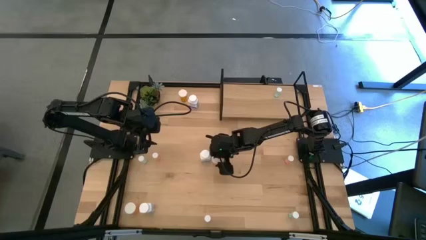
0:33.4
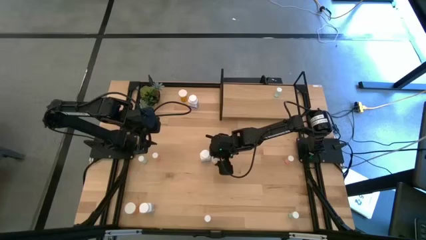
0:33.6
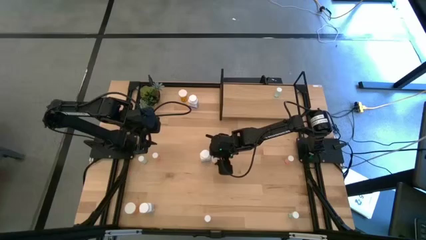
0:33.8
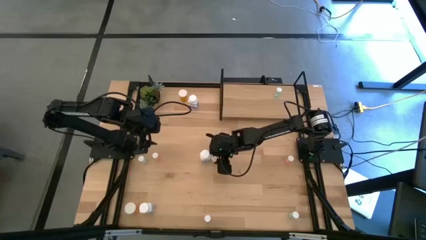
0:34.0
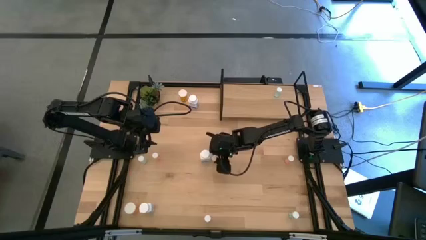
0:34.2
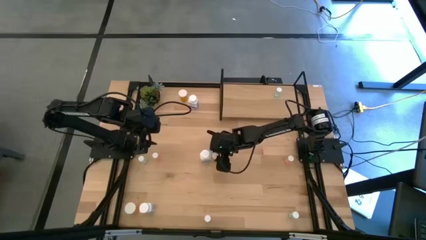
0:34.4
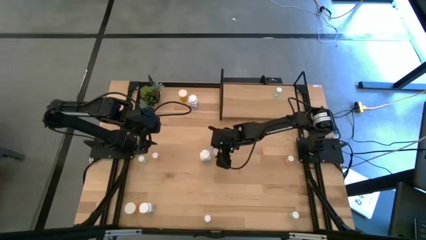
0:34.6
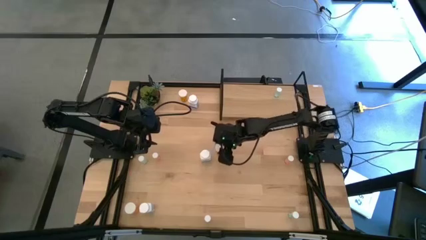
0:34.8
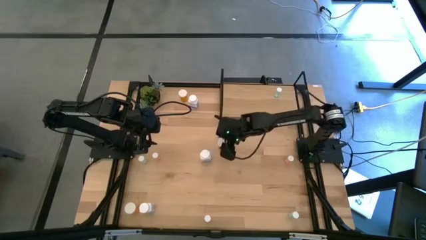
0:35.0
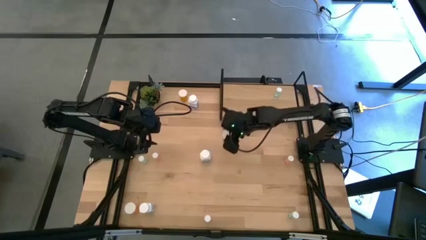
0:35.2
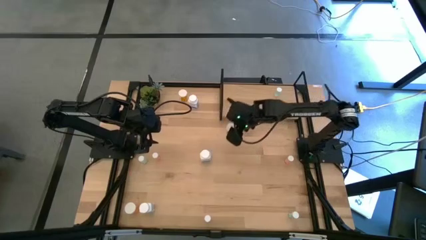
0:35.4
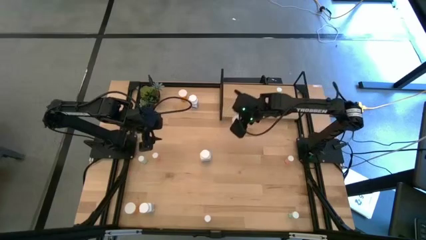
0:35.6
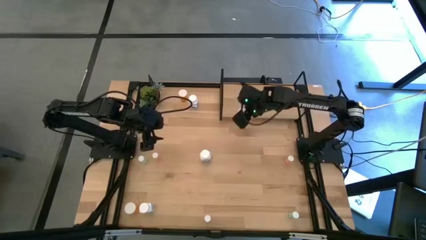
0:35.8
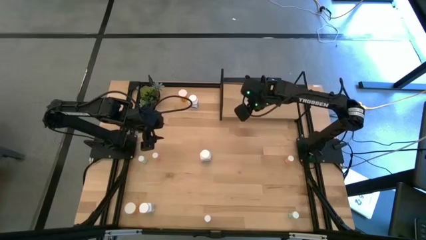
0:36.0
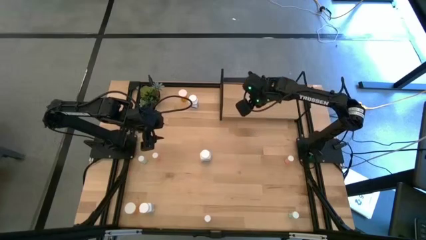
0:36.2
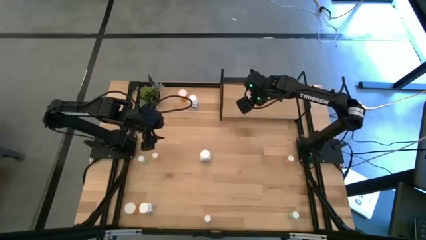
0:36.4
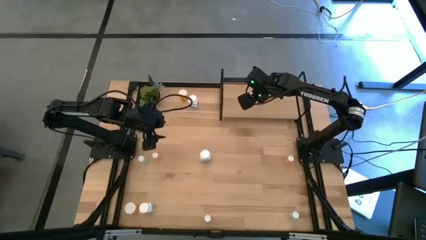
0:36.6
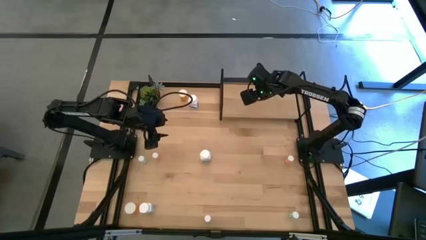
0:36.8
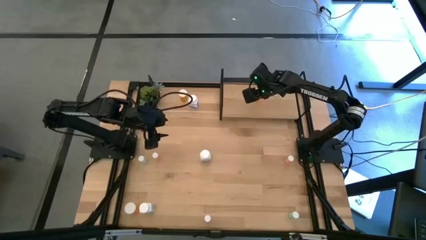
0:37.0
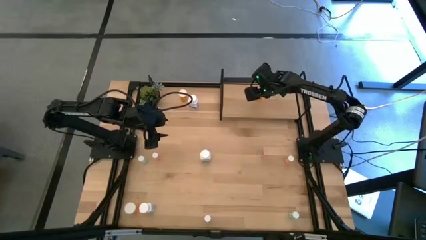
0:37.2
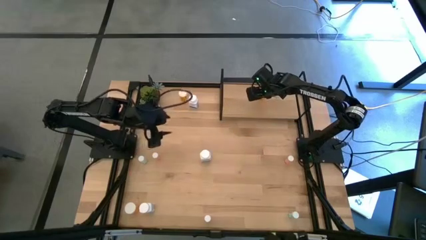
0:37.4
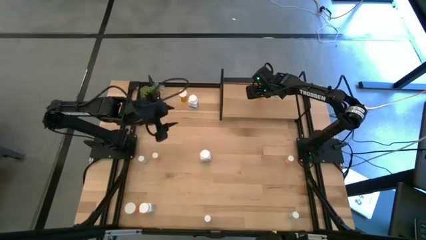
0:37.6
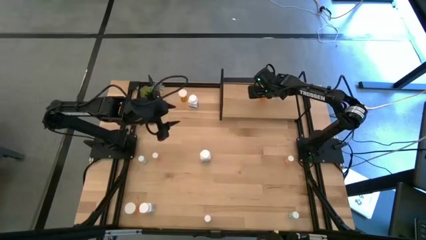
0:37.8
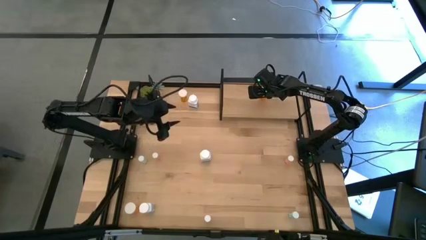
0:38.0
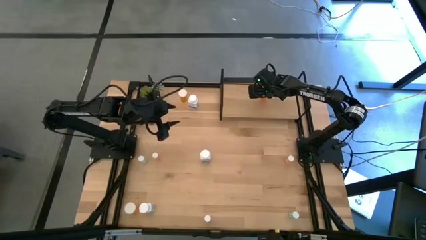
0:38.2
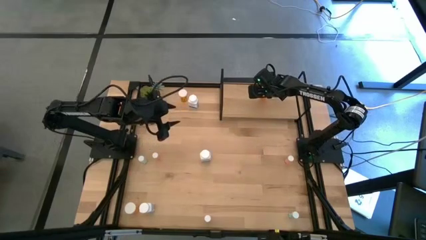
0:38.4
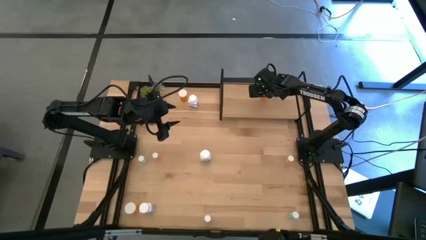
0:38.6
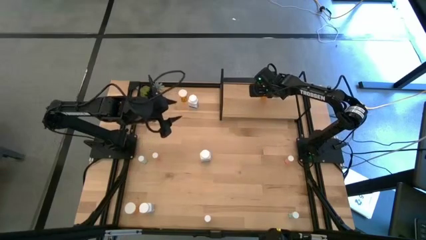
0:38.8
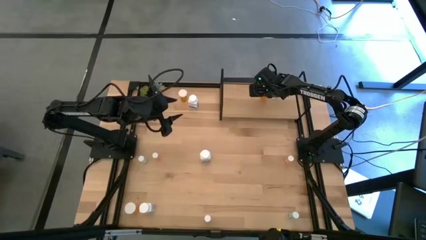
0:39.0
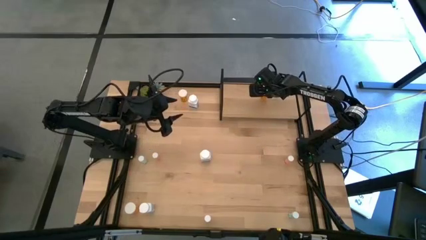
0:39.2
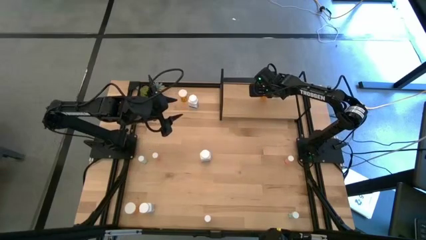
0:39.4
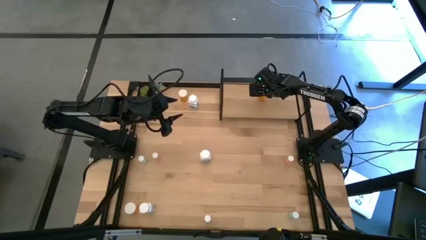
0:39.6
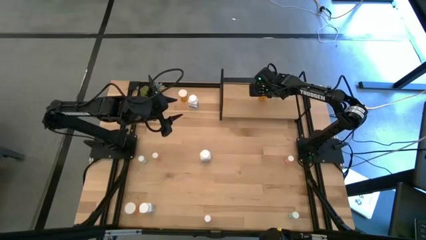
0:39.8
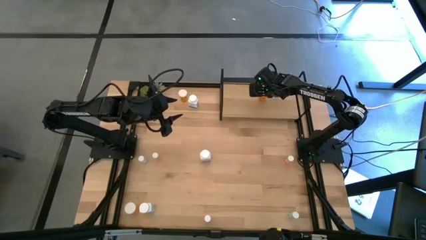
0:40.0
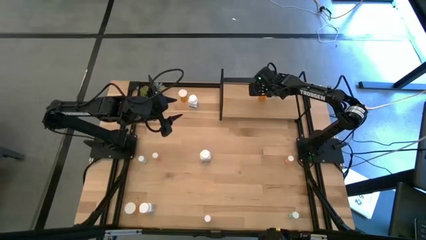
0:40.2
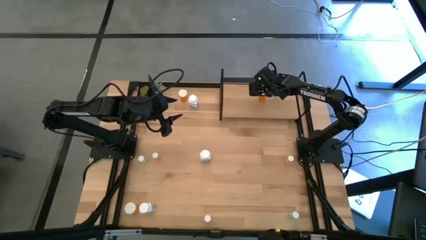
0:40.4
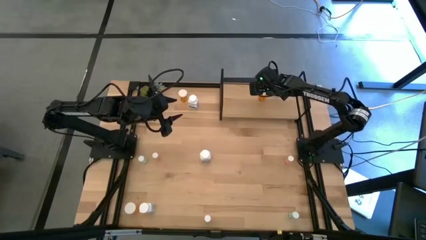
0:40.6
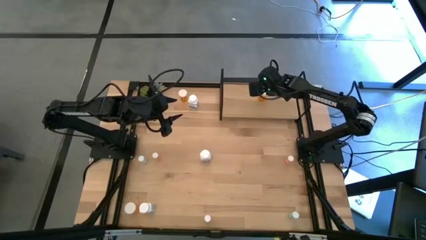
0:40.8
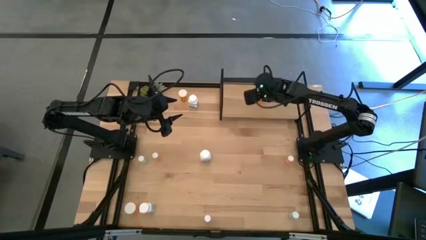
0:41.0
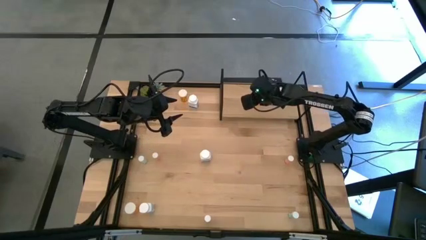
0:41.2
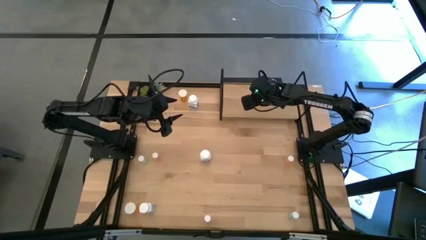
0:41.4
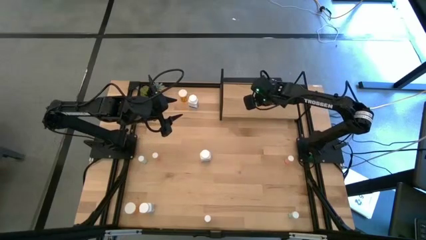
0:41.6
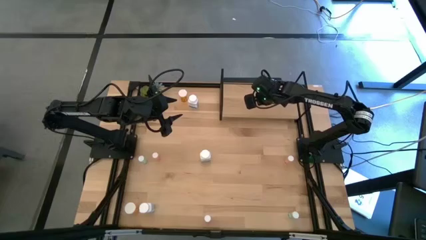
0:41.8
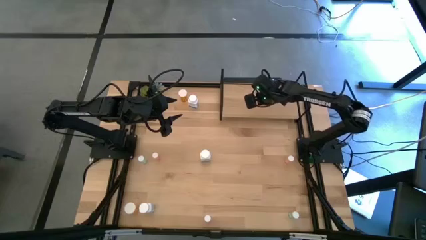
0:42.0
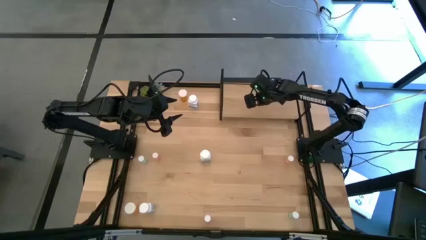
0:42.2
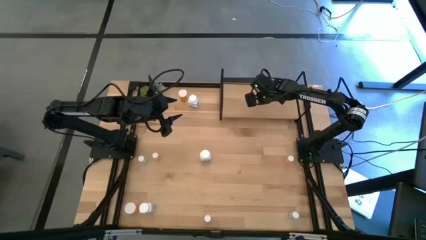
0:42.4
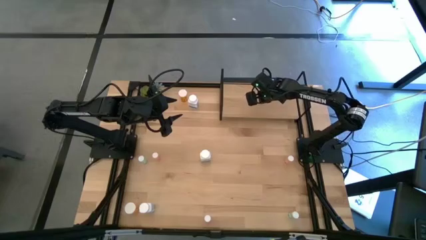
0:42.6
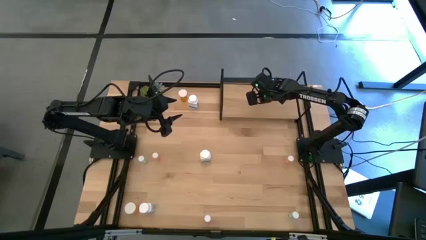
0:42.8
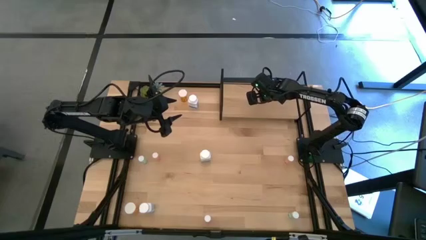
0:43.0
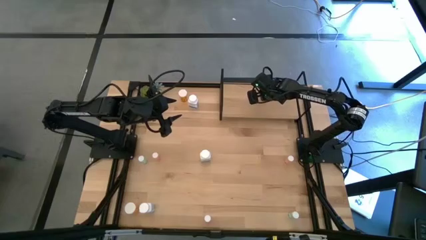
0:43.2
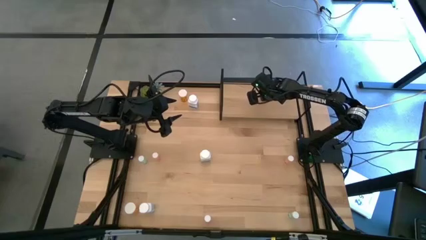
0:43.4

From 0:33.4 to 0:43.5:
Task: Pick and place medicine bottles onto shelf by color
Put the middle orange pill bottle on the shelf
